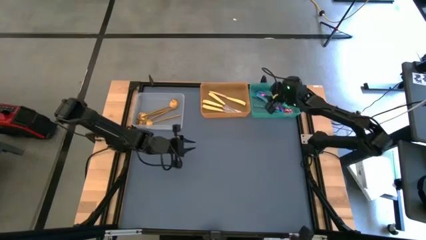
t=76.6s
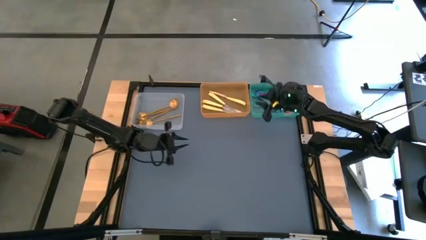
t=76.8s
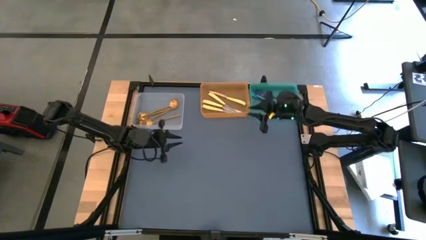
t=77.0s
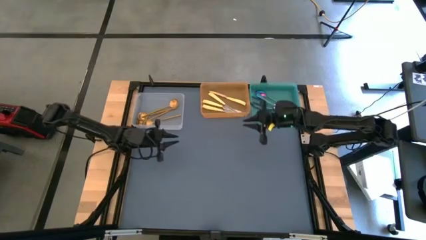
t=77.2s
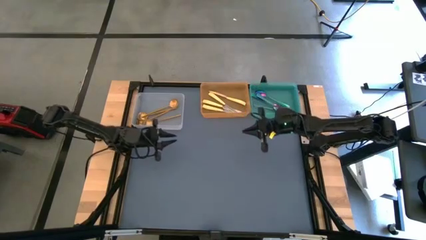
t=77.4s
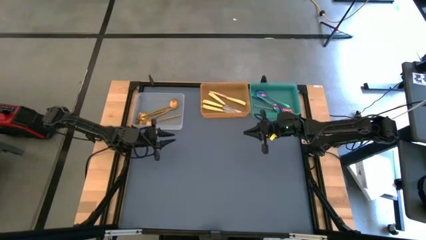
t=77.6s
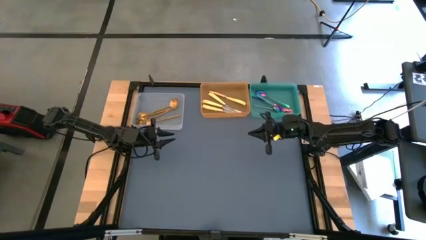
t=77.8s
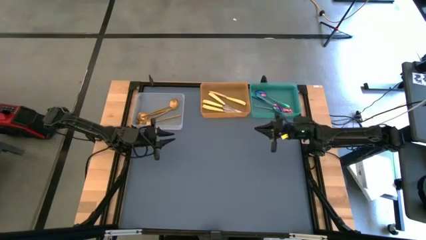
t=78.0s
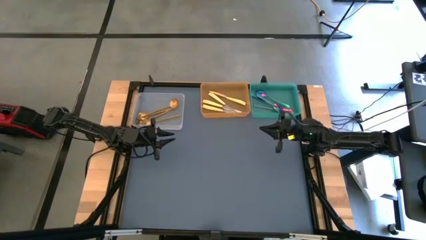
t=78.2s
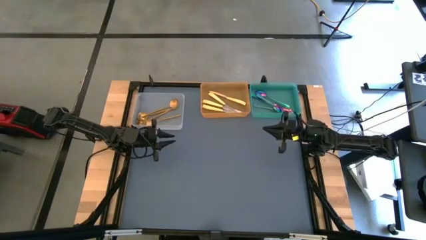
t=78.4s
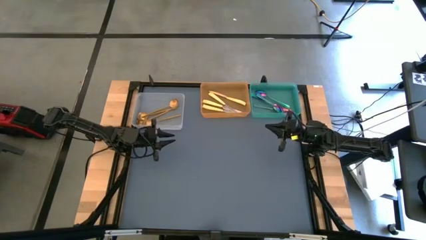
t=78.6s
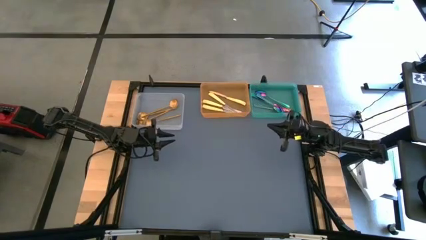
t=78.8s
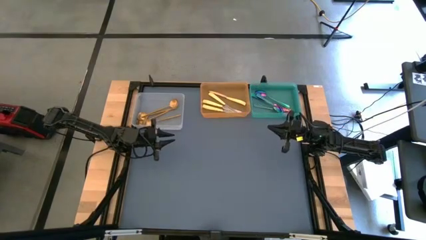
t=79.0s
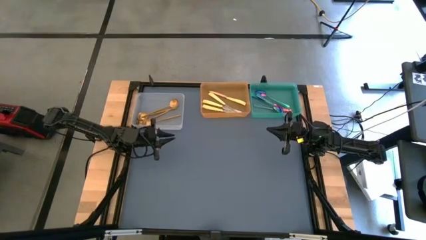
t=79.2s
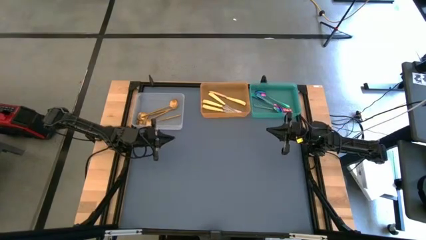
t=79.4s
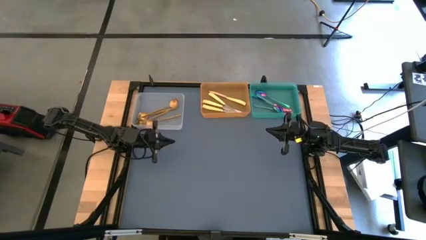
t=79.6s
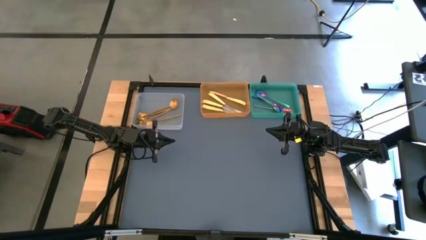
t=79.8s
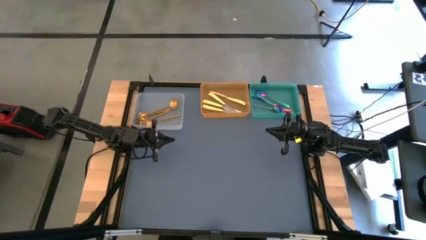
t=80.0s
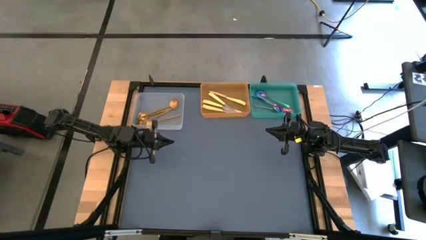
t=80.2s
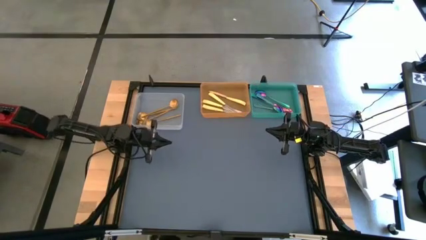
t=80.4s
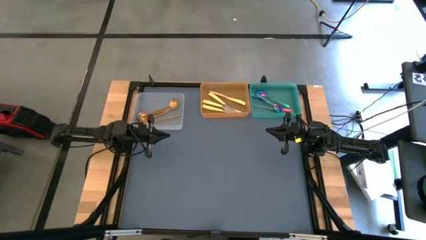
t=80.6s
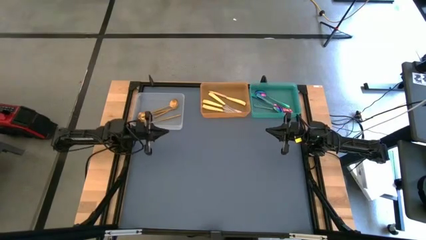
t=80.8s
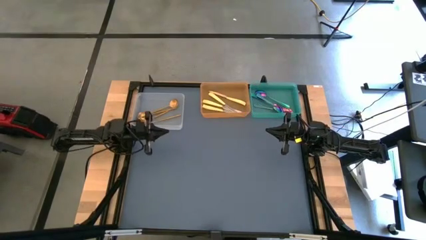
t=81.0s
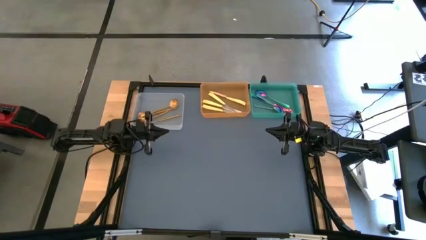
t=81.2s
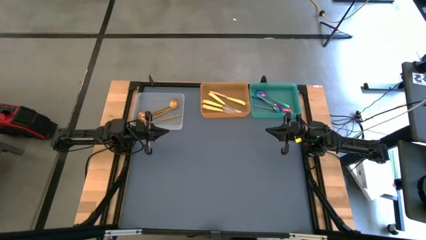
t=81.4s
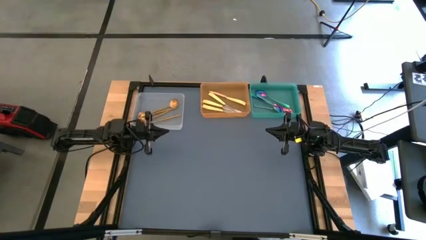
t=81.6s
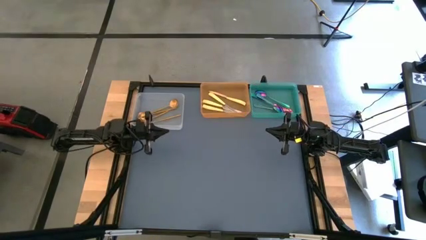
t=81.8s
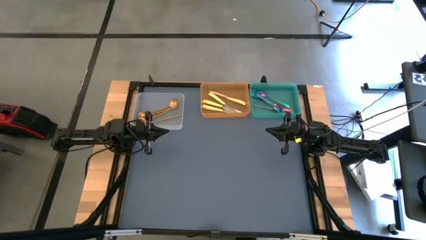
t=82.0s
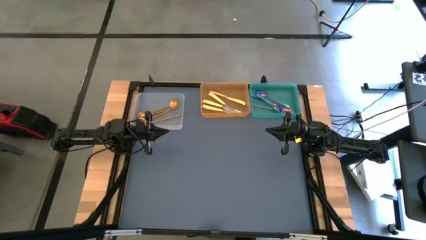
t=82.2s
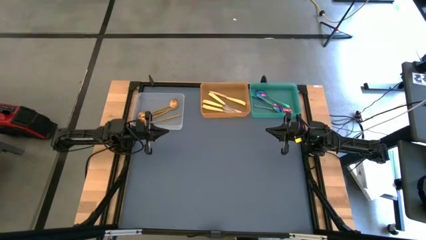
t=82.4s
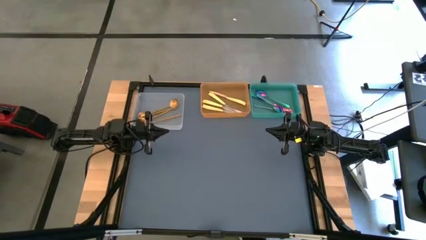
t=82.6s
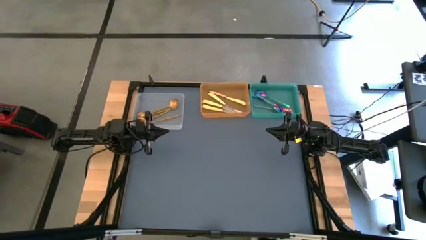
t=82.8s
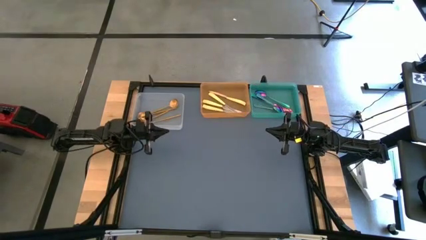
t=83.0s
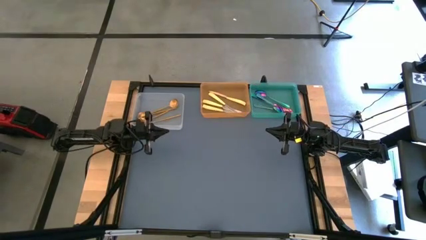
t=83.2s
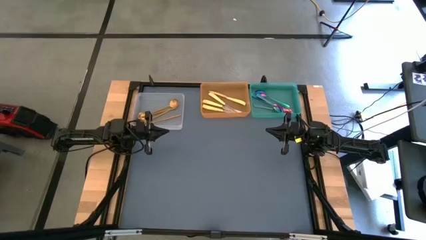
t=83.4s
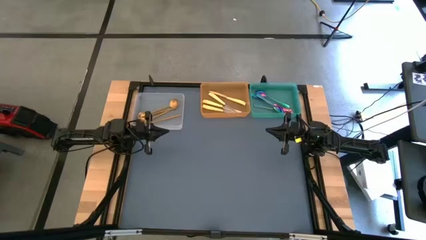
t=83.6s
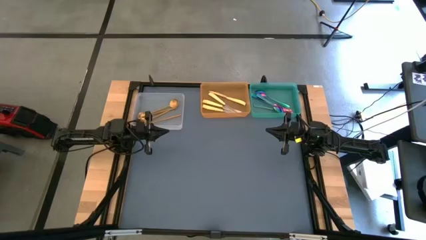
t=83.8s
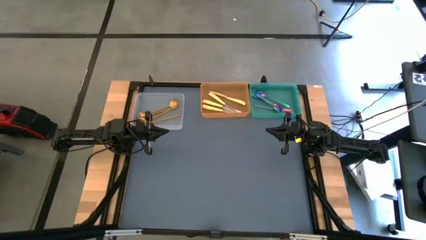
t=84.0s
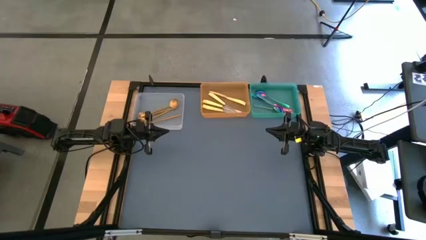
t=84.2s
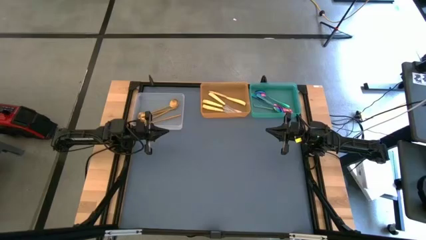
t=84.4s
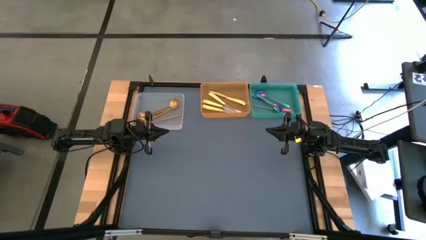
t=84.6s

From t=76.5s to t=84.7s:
Task: Sort silverware by color (type)
Return to Home Position

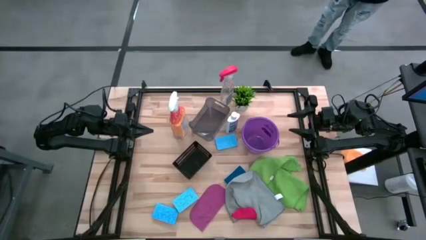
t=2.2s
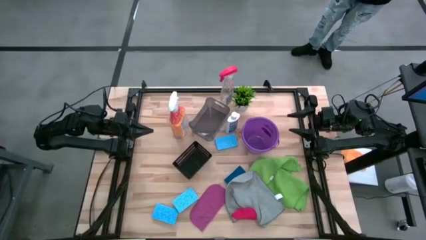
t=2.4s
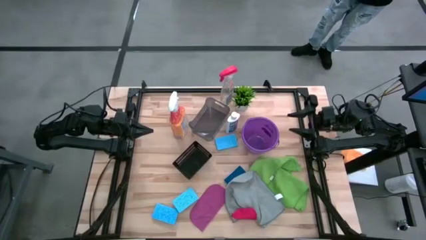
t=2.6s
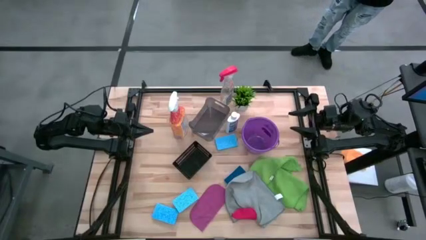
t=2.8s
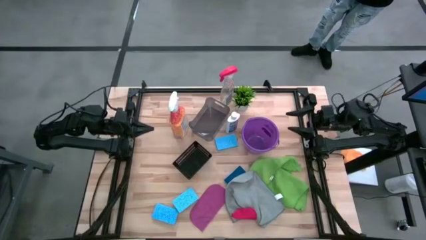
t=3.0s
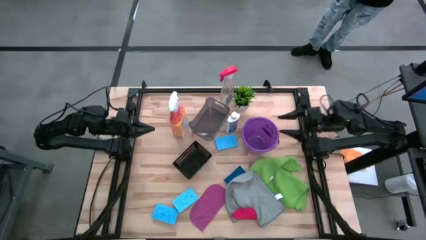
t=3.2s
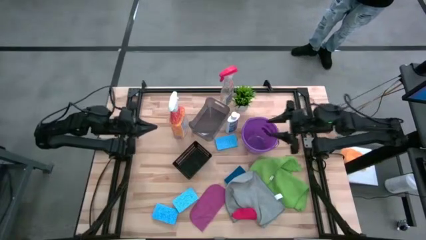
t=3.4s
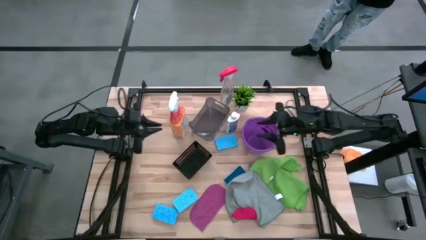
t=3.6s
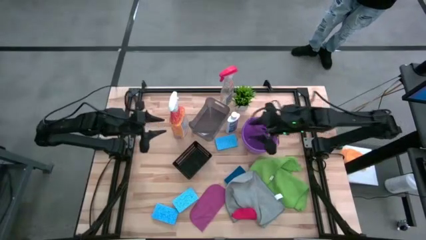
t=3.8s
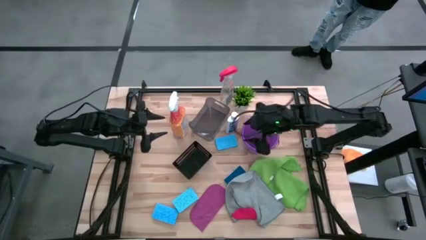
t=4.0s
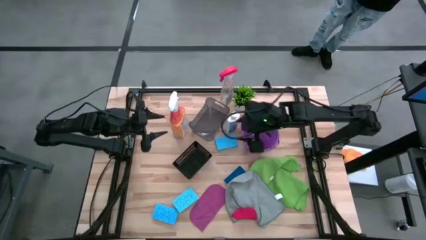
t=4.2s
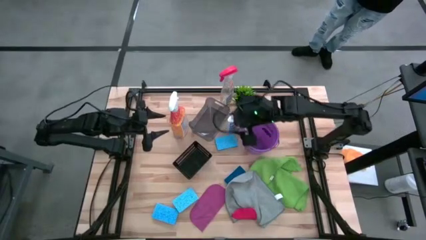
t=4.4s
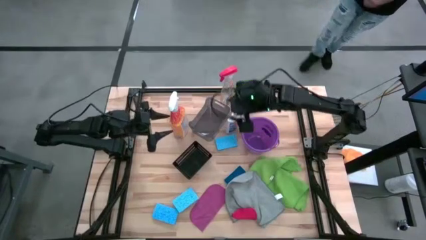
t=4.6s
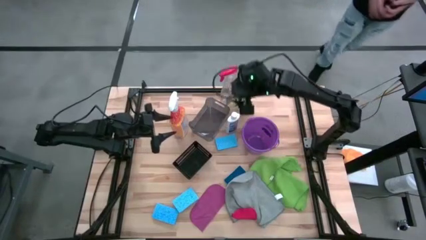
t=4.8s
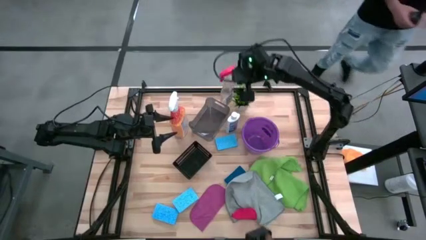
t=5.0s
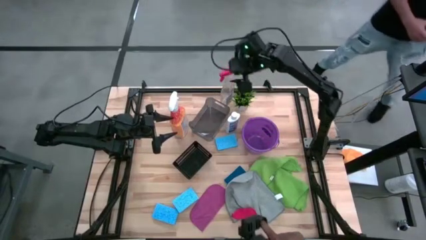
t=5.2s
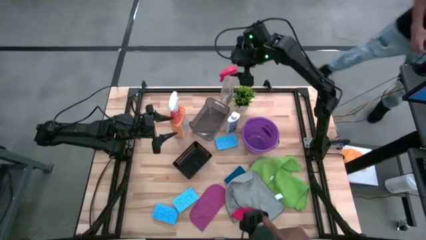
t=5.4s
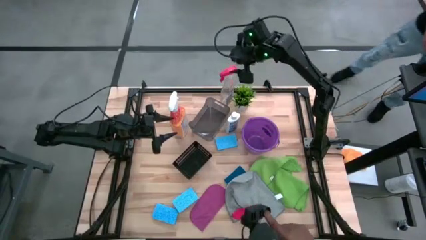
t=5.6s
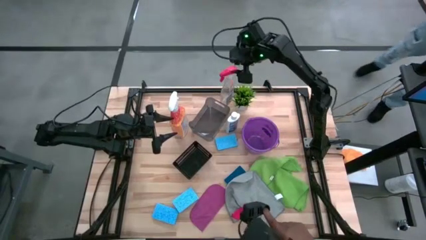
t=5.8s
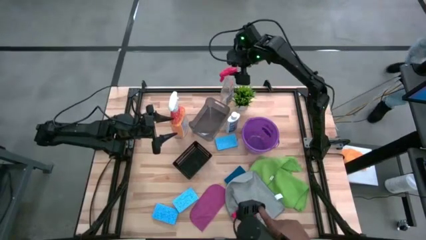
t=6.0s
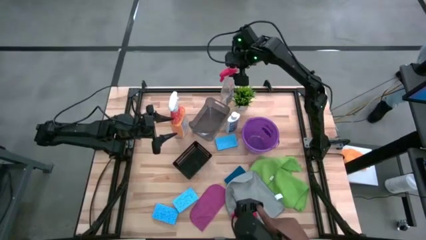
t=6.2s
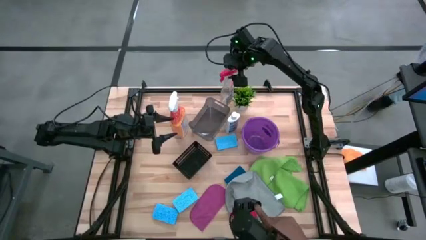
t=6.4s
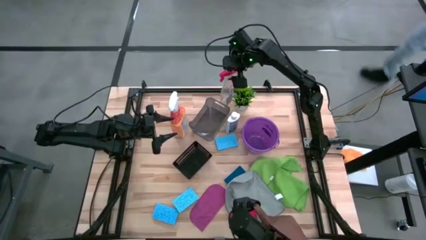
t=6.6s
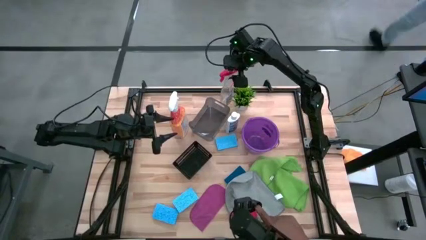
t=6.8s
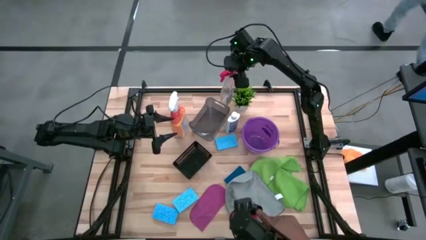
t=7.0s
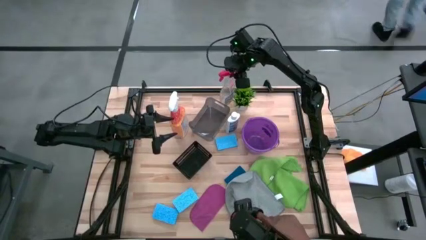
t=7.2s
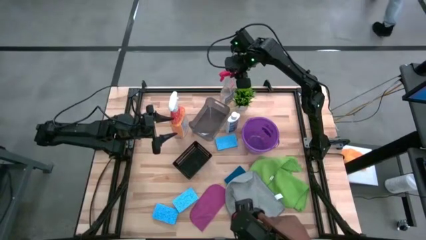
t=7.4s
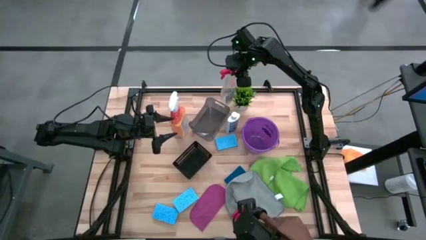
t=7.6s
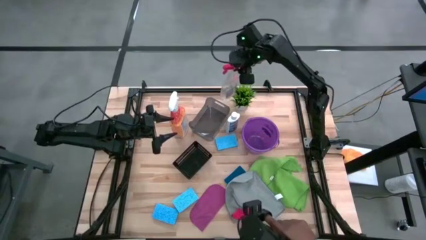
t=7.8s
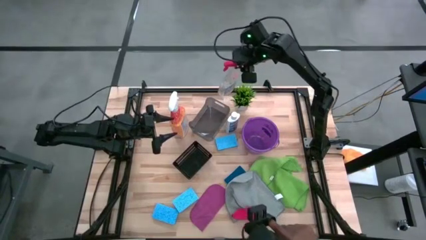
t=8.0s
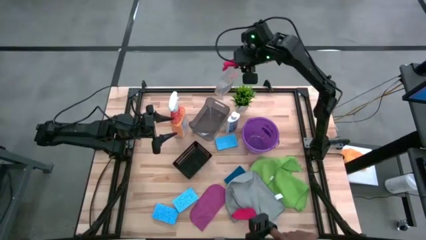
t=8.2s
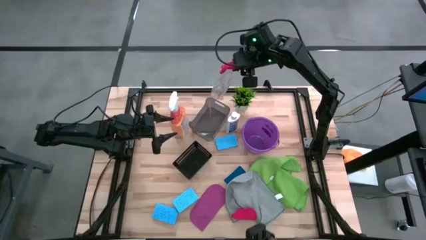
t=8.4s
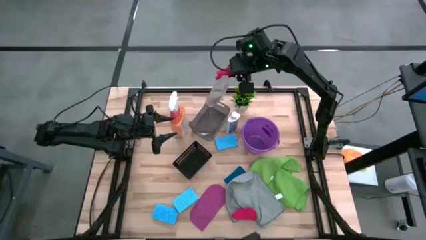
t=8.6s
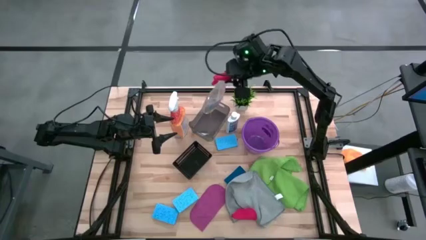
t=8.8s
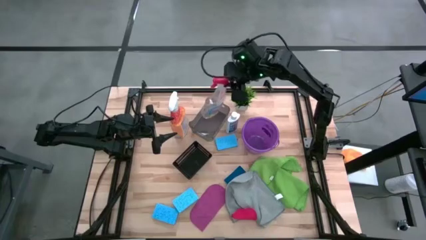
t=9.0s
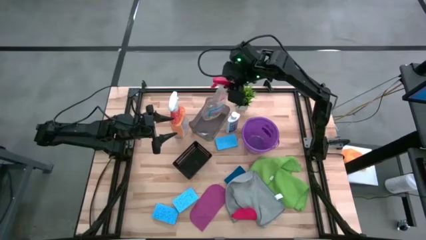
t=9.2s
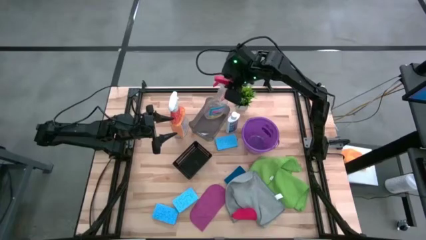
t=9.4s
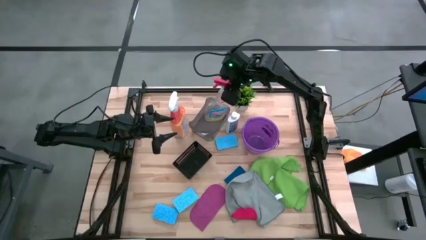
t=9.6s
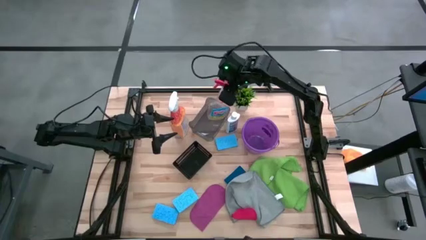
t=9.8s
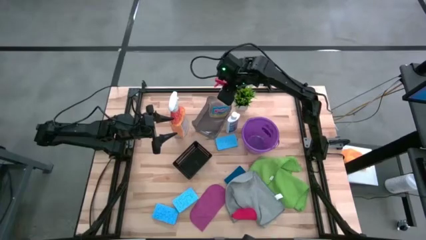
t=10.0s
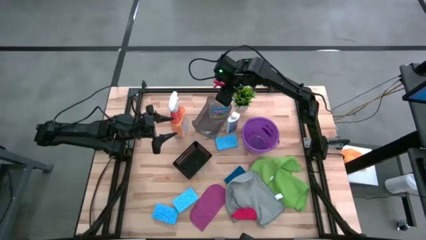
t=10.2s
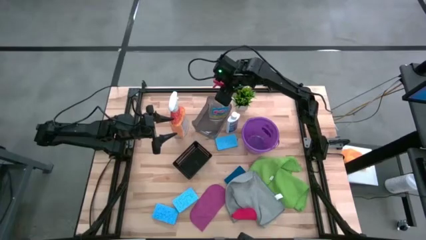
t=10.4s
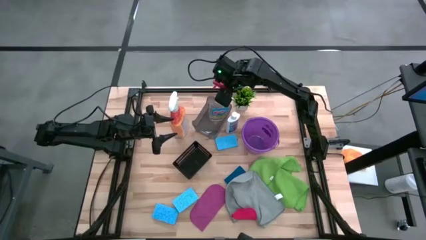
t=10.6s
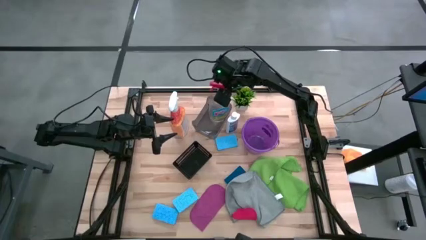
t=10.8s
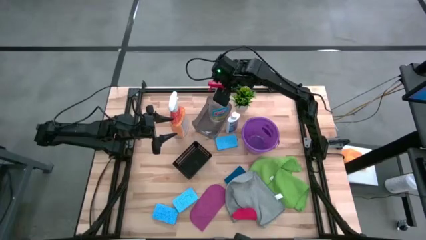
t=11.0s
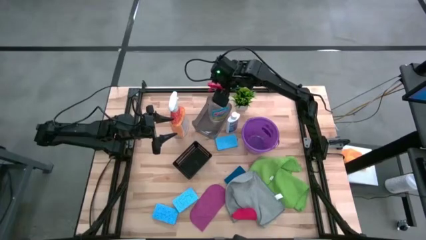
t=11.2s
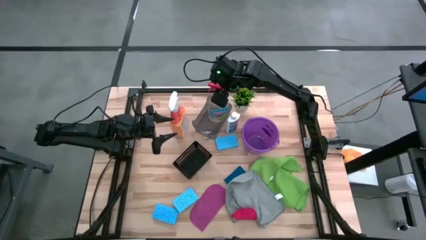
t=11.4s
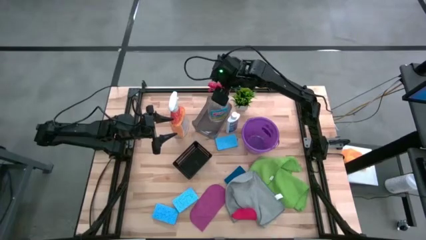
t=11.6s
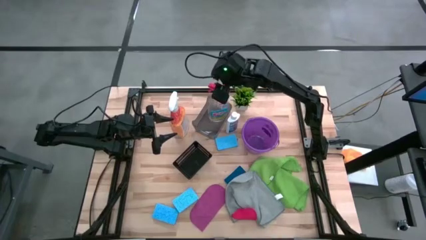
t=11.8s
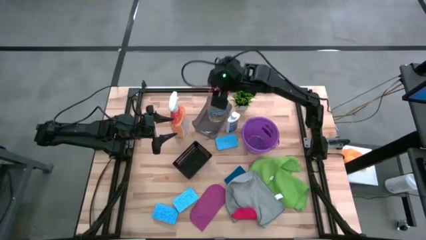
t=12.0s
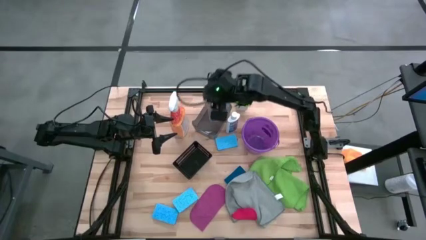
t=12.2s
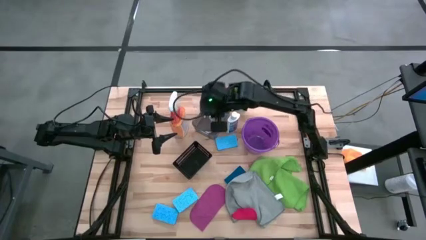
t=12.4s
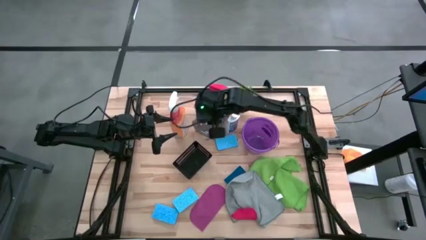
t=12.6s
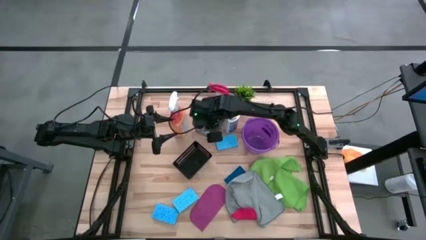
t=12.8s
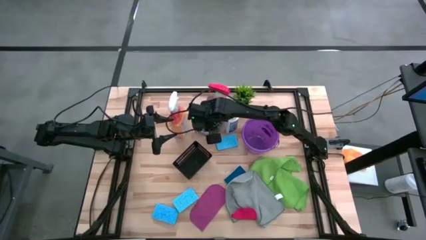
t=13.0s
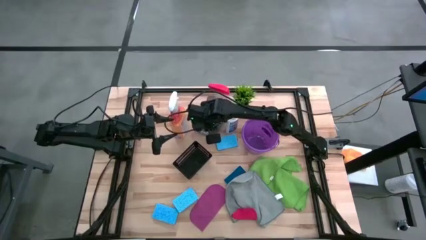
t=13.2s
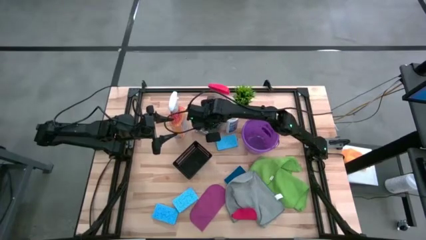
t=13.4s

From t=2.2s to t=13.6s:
Task: Pick & Place Kitchen Items
Put the red spray bottle into the black bin
